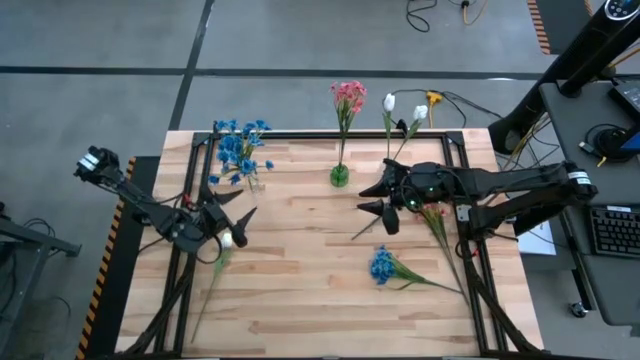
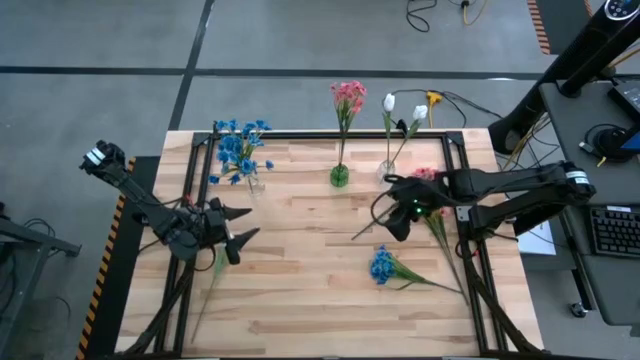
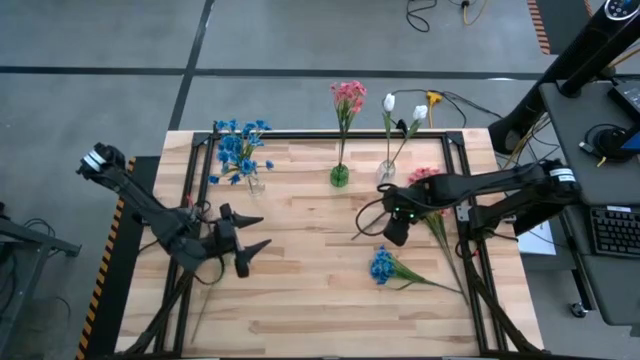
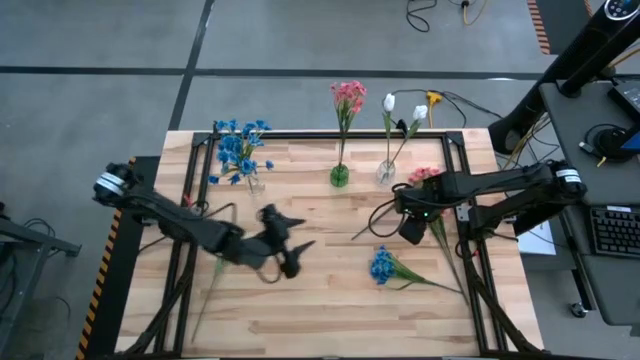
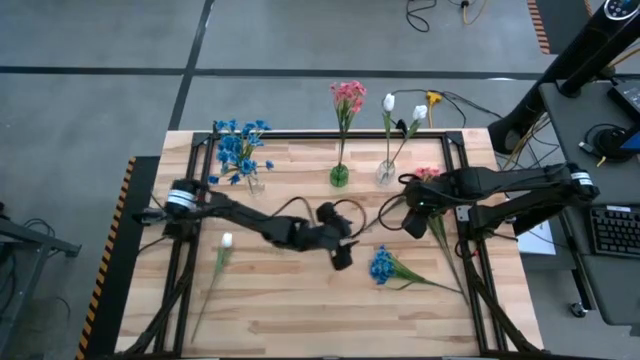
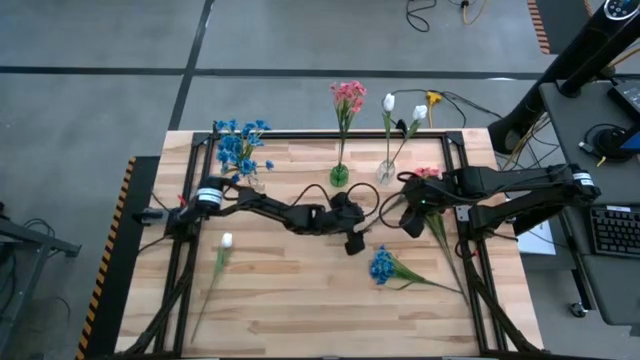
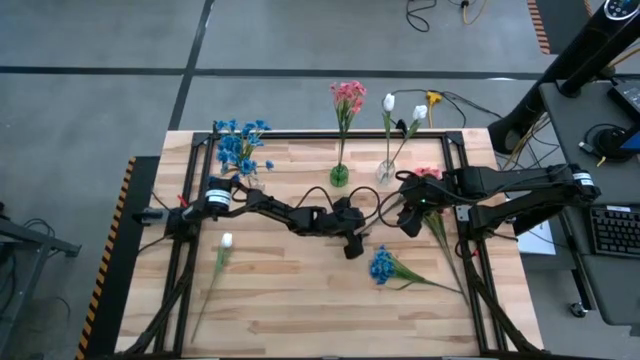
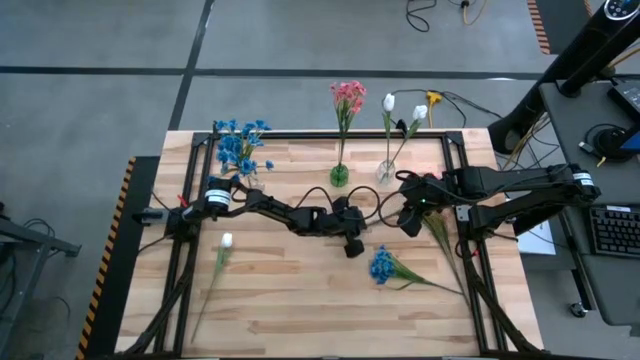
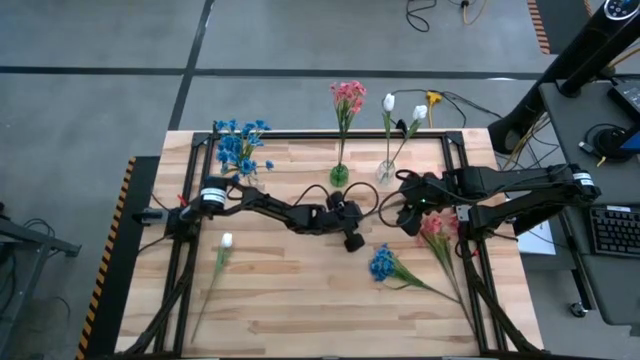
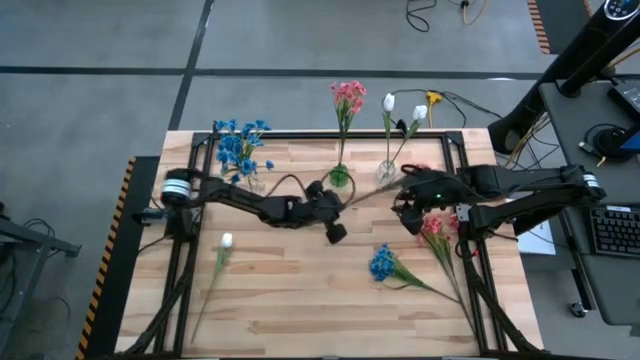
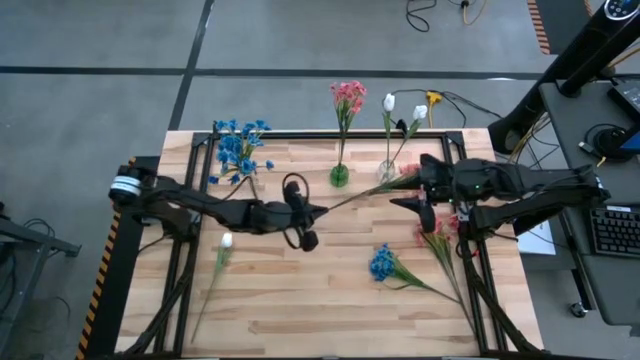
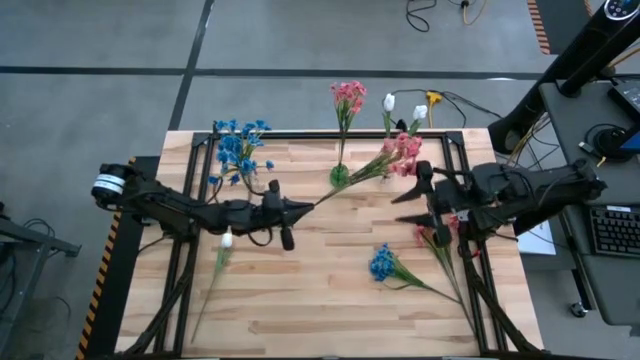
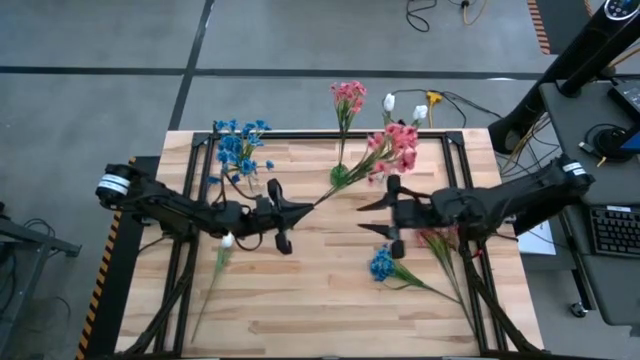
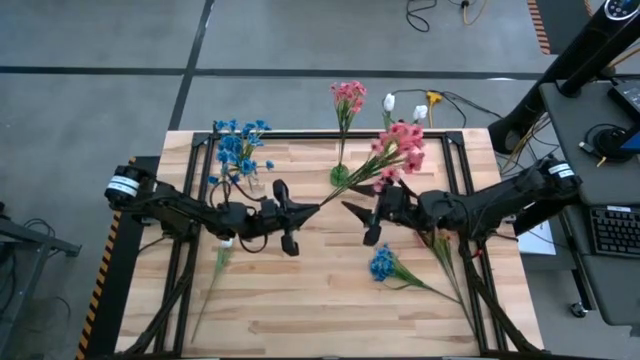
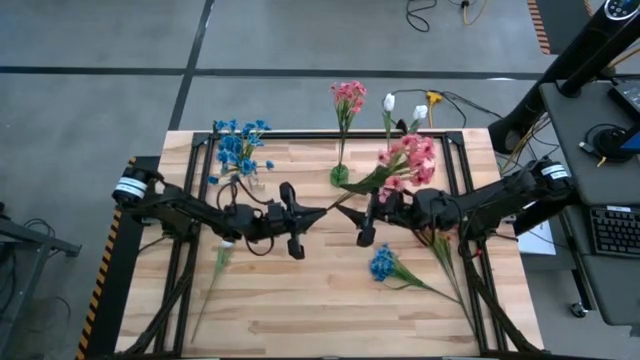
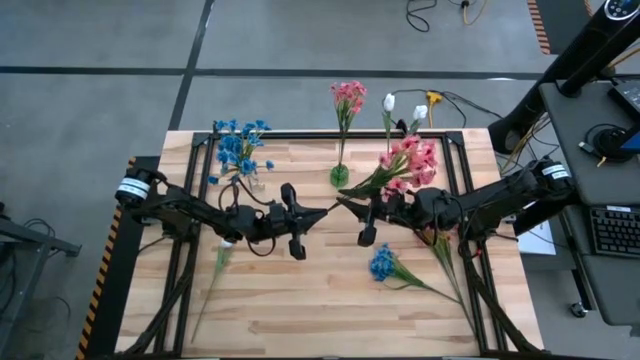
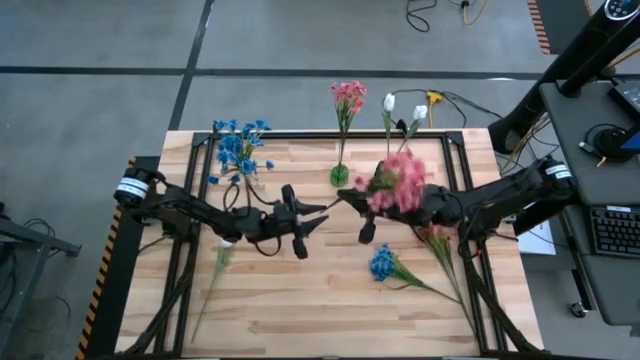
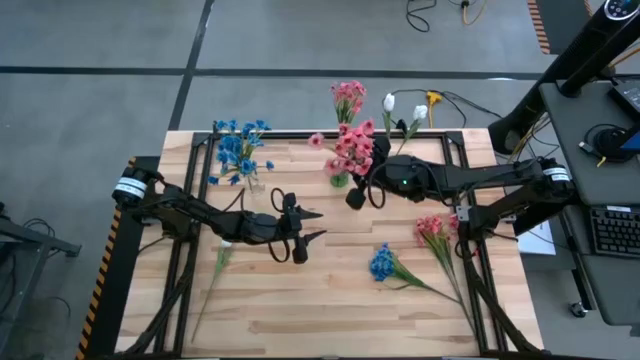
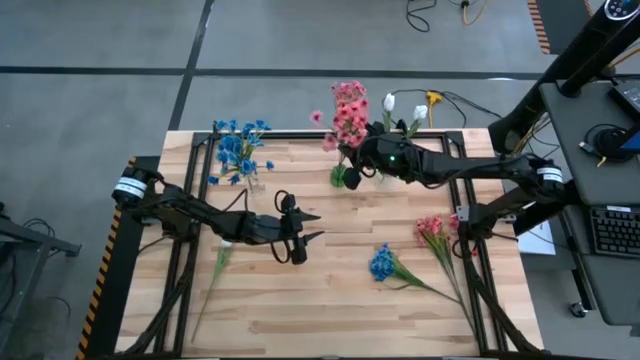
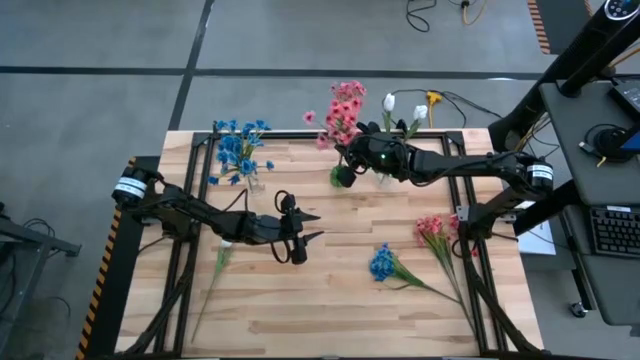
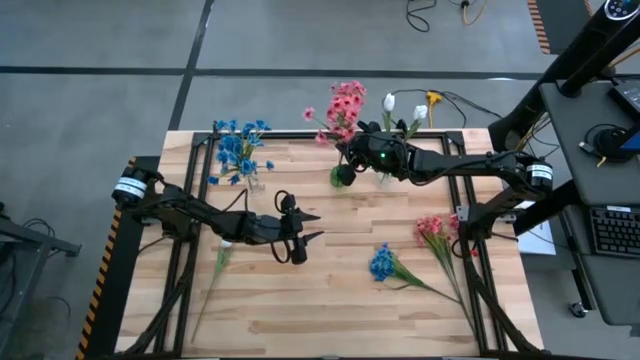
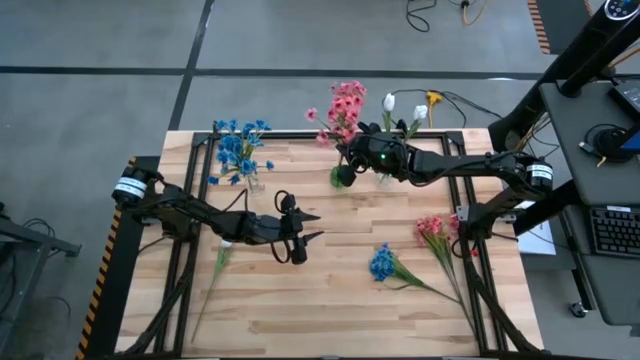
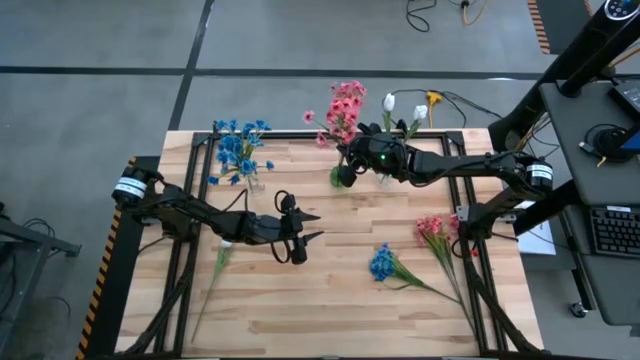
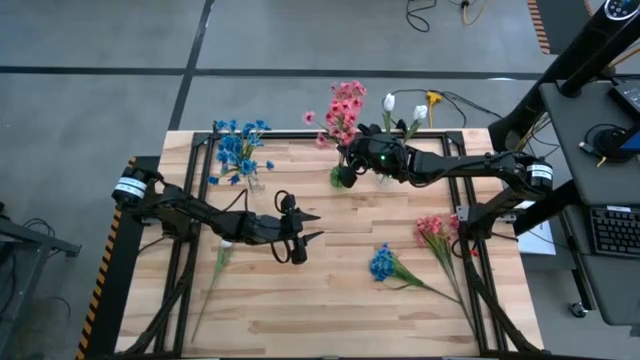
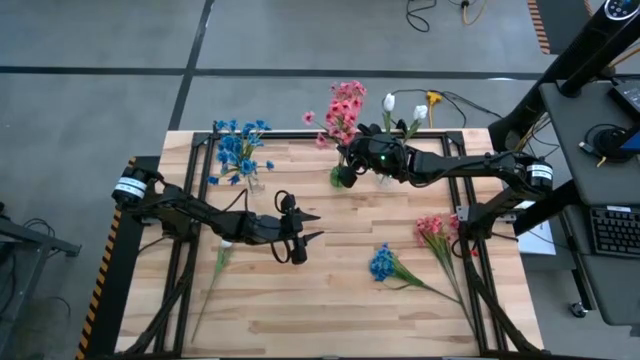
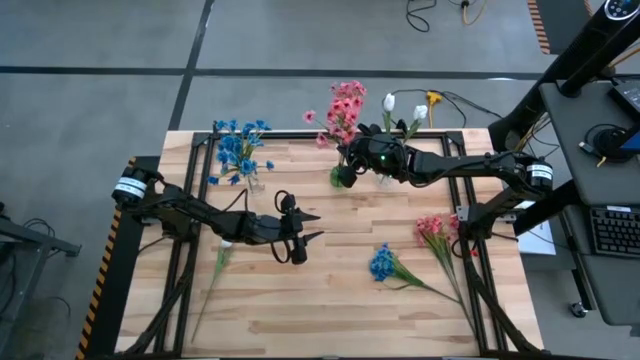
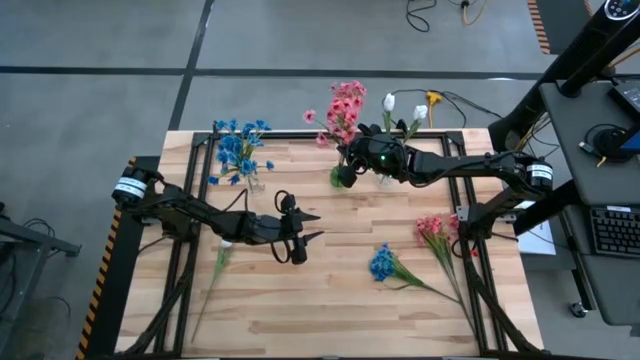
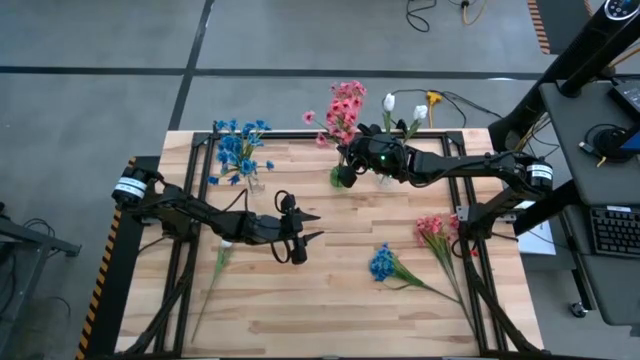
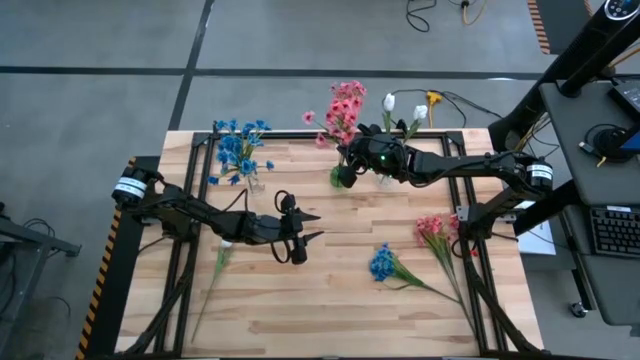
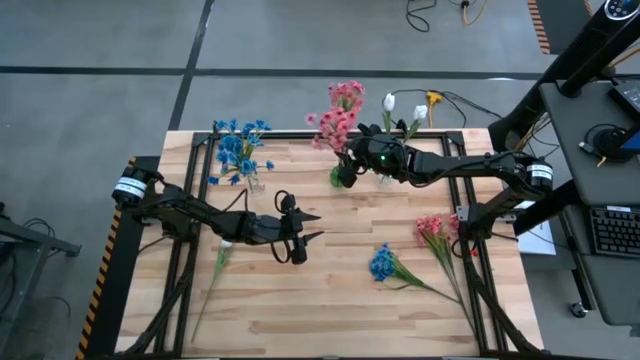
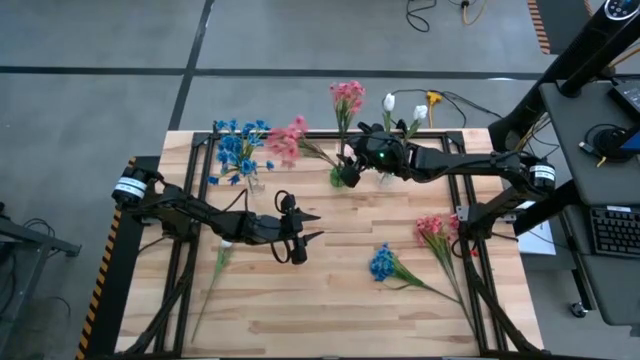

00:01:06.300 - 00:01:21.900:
Task: Sort flowers into vase by color
Put the top pink flowers into the green vase

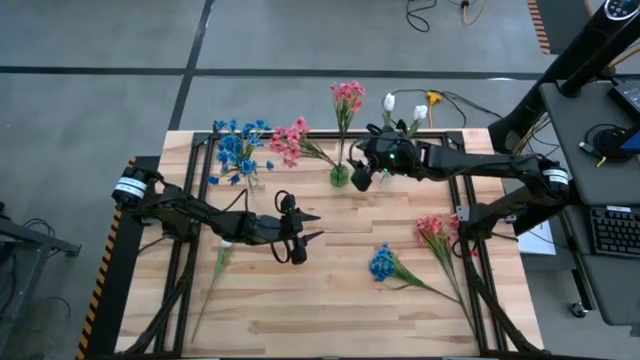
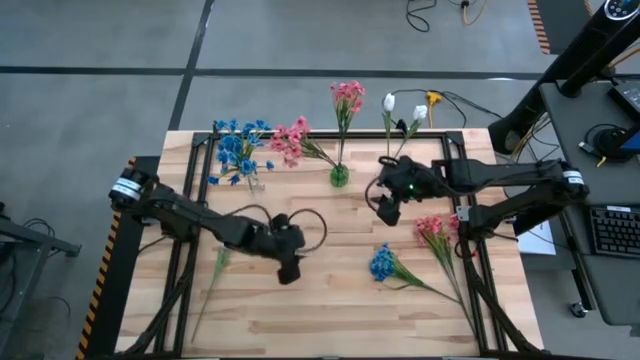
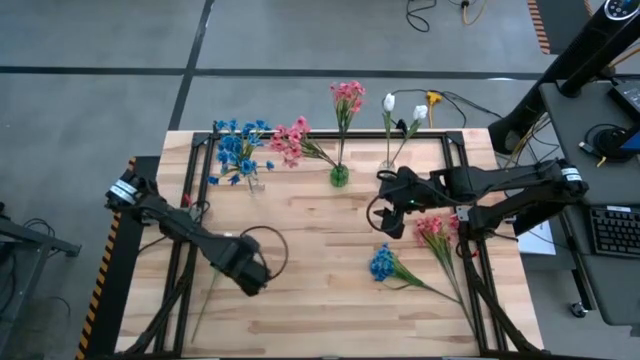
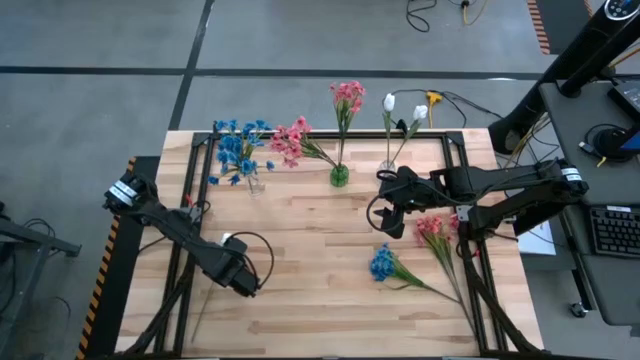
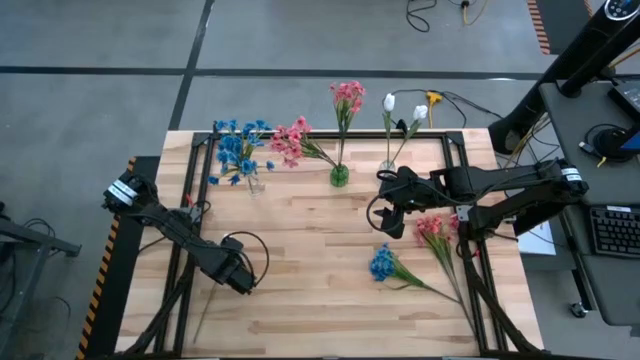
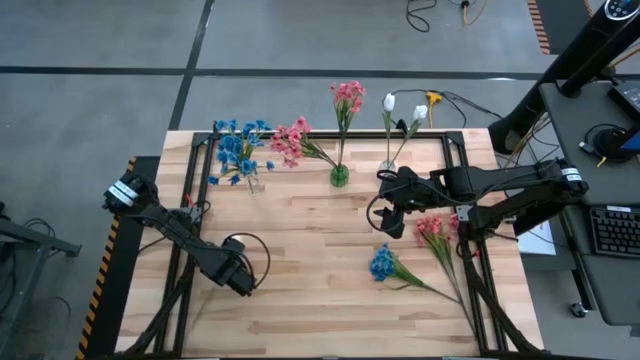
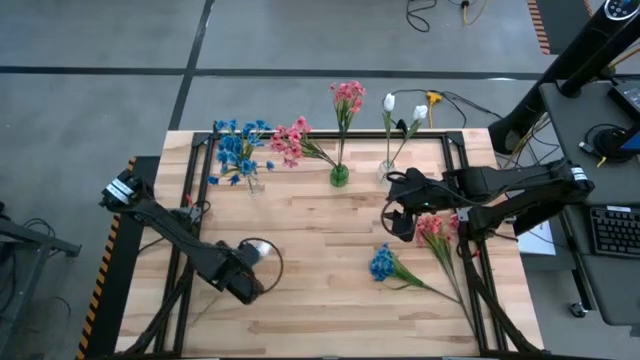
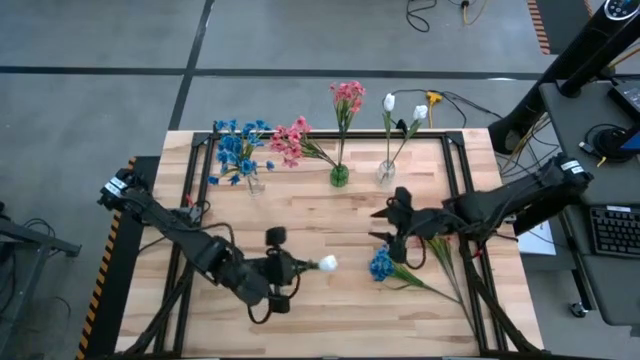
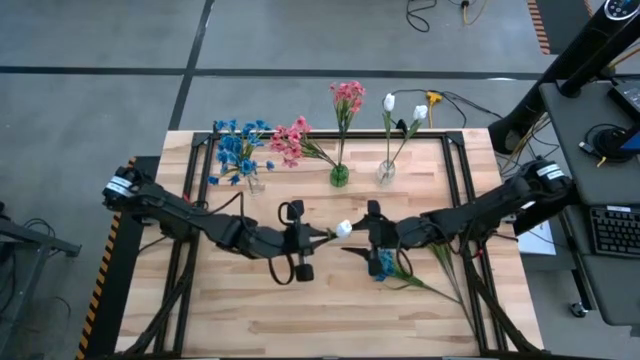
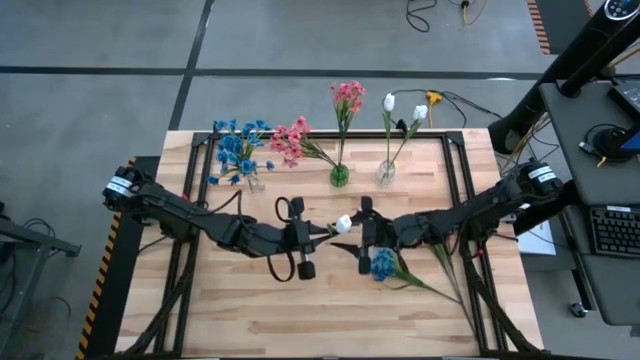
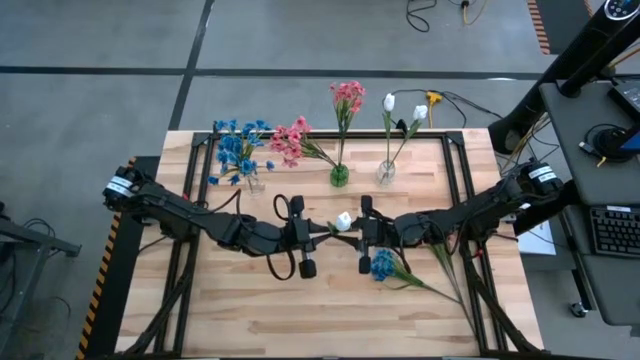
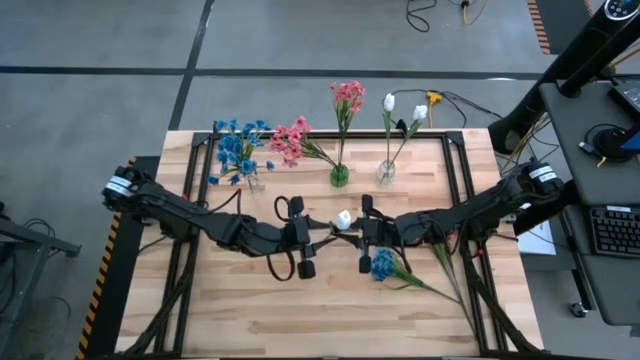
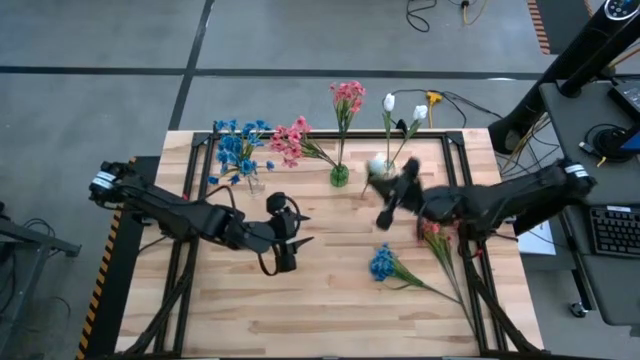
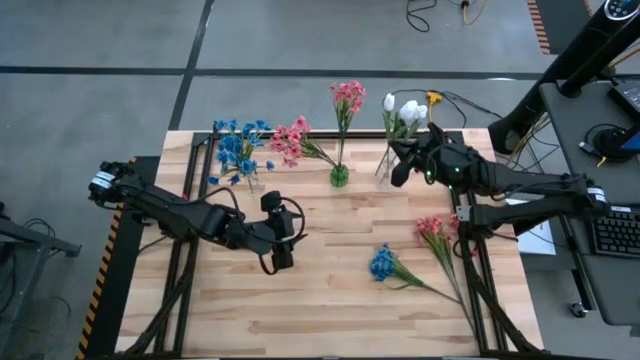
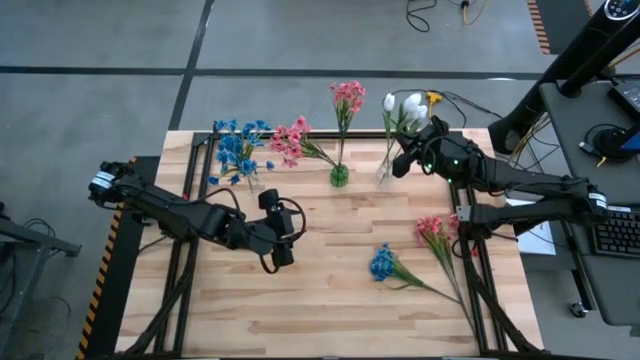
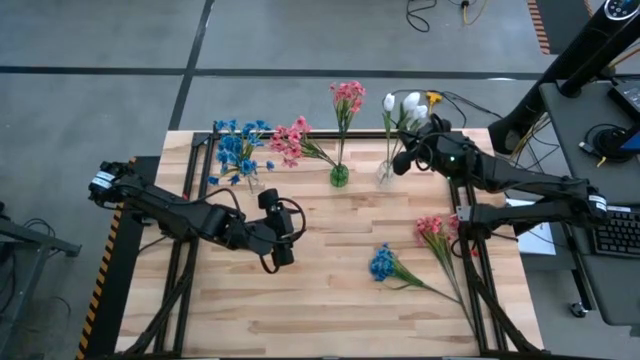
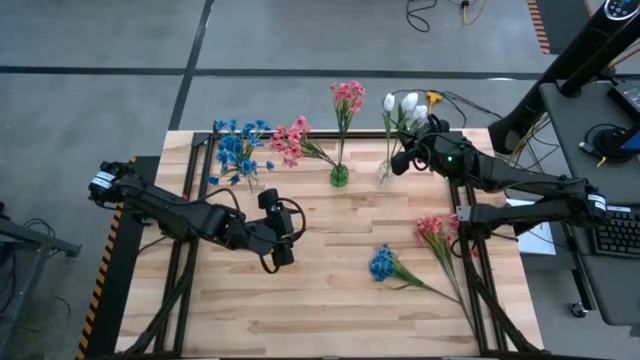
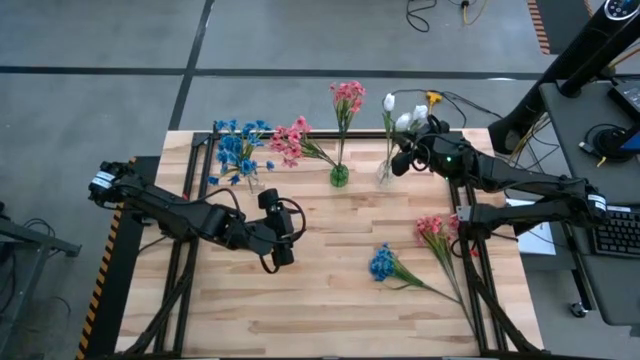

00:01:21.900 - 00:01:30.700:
Put the white flower into the right transparent vase
